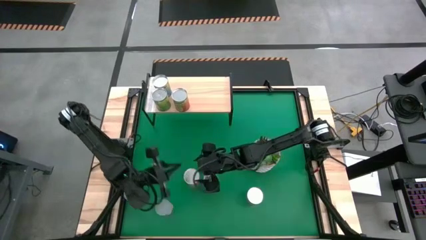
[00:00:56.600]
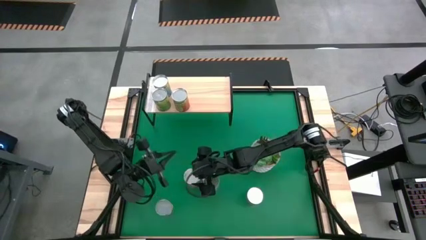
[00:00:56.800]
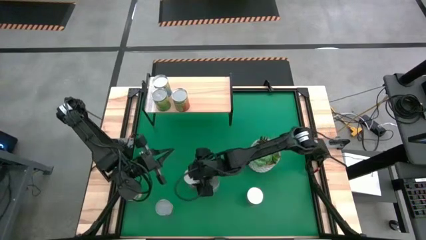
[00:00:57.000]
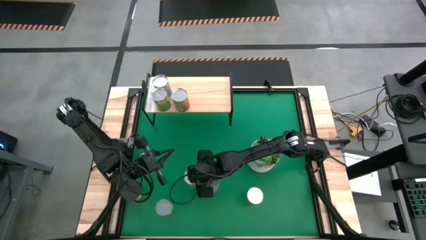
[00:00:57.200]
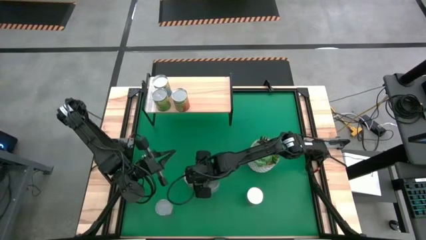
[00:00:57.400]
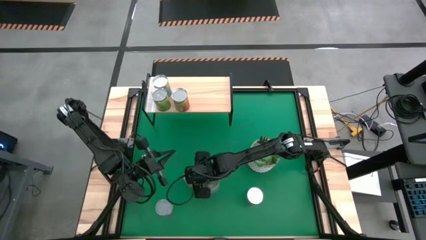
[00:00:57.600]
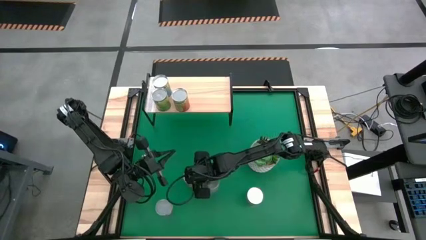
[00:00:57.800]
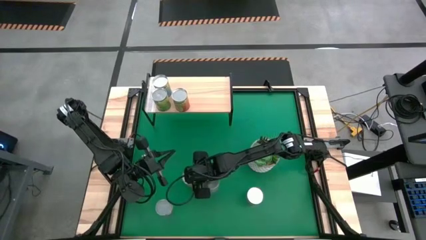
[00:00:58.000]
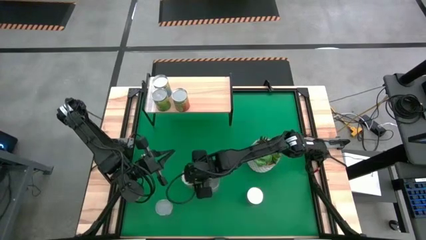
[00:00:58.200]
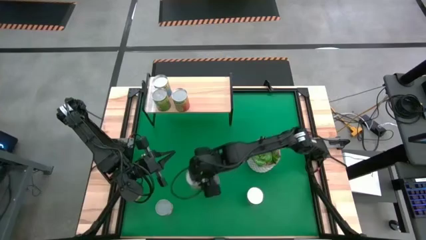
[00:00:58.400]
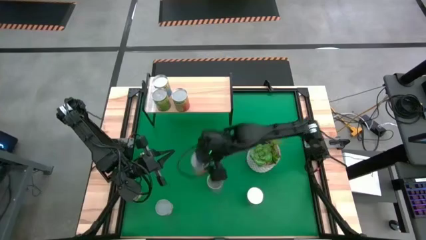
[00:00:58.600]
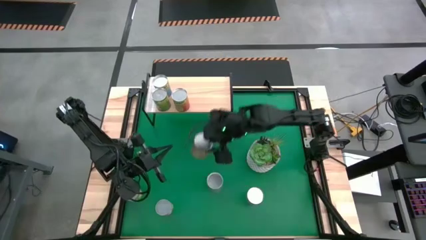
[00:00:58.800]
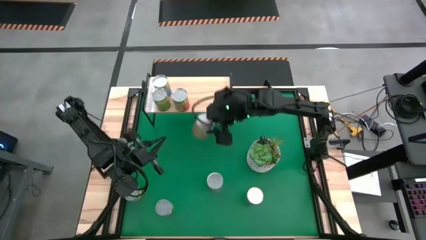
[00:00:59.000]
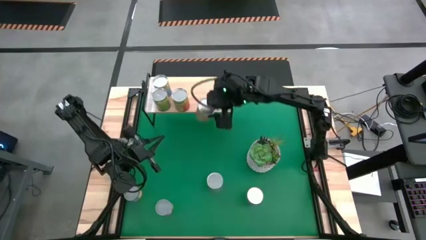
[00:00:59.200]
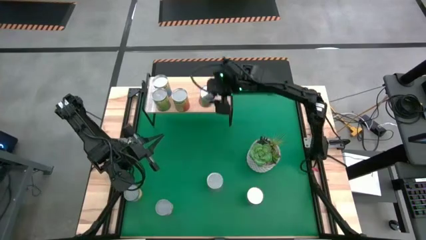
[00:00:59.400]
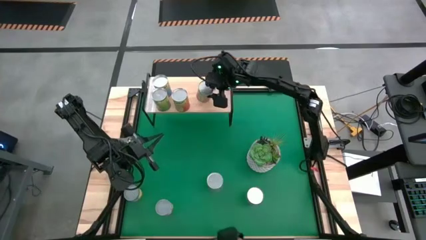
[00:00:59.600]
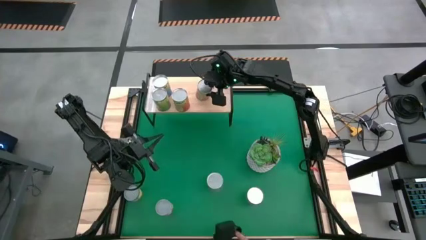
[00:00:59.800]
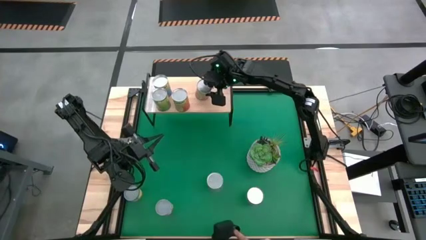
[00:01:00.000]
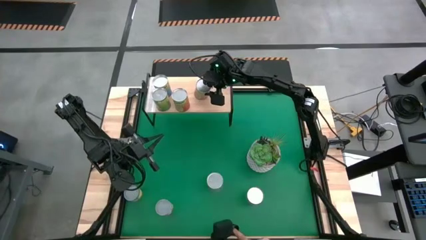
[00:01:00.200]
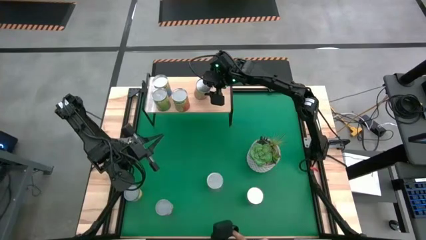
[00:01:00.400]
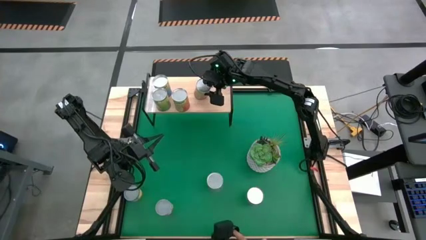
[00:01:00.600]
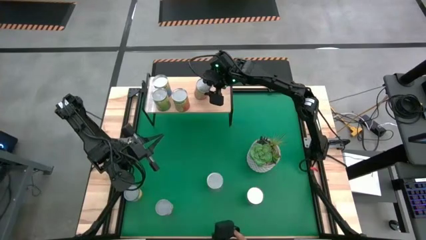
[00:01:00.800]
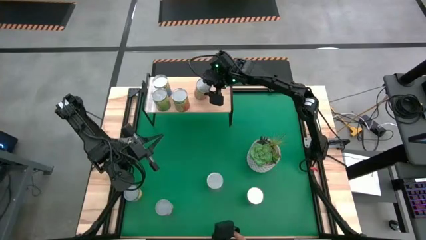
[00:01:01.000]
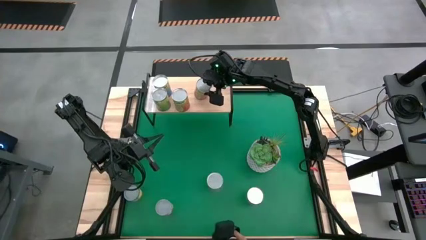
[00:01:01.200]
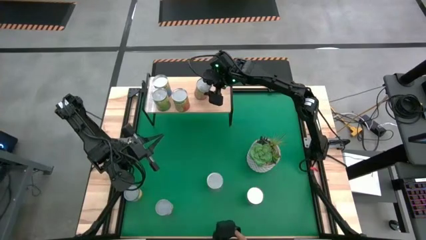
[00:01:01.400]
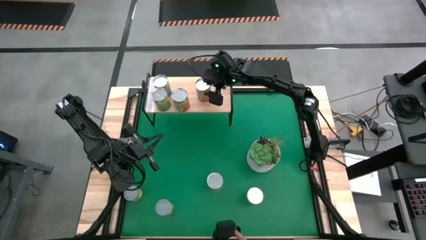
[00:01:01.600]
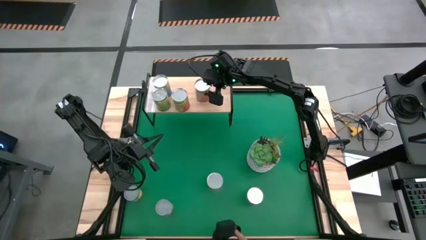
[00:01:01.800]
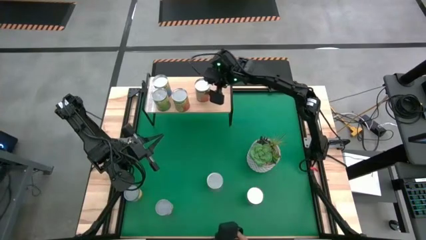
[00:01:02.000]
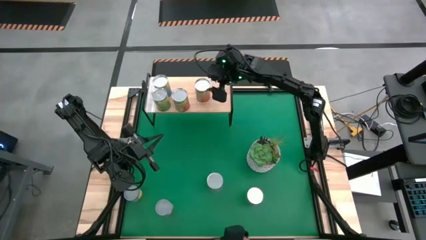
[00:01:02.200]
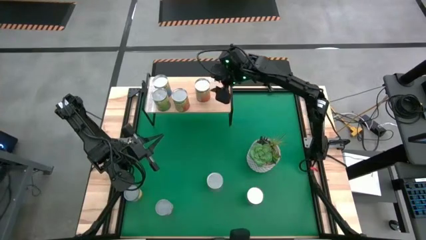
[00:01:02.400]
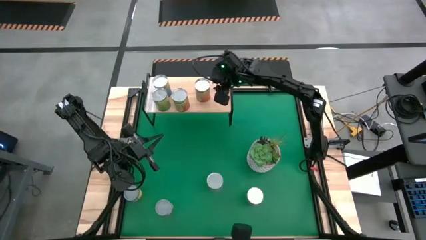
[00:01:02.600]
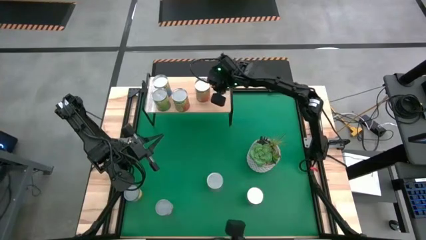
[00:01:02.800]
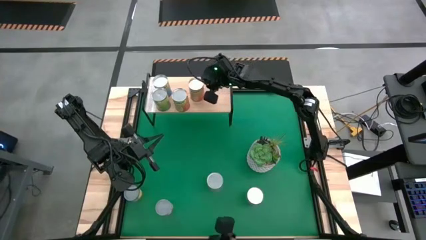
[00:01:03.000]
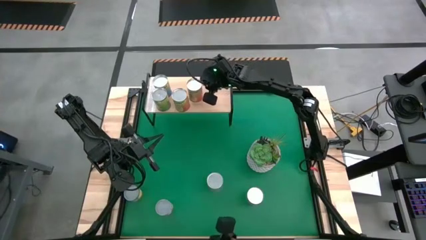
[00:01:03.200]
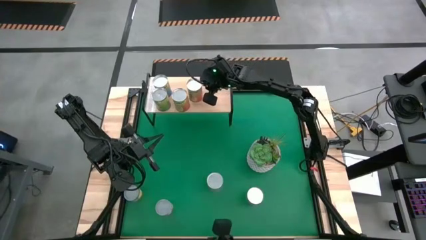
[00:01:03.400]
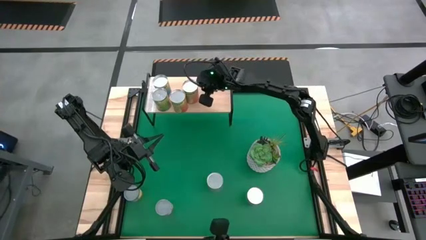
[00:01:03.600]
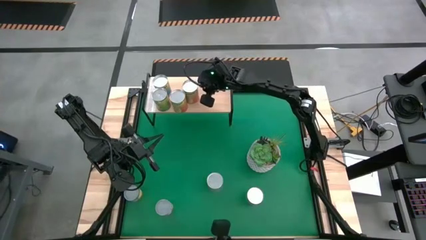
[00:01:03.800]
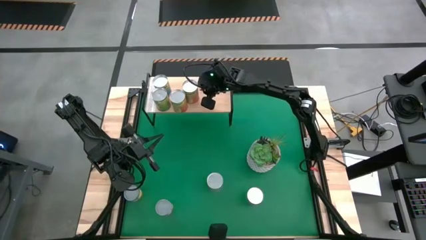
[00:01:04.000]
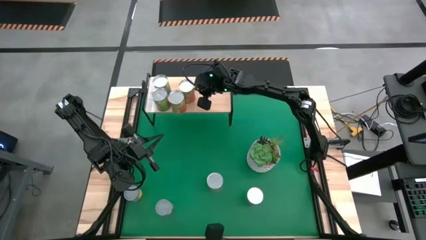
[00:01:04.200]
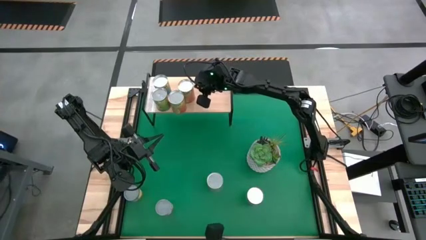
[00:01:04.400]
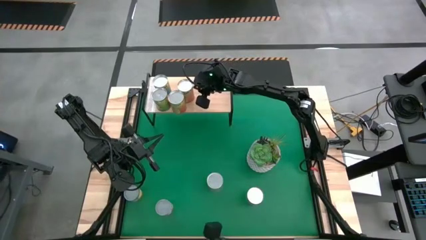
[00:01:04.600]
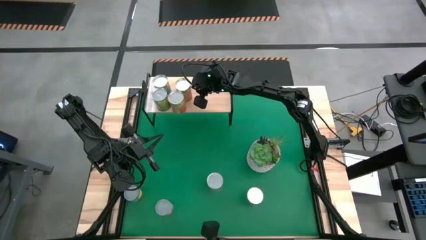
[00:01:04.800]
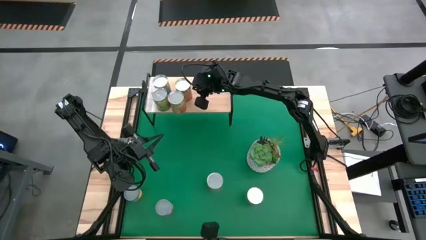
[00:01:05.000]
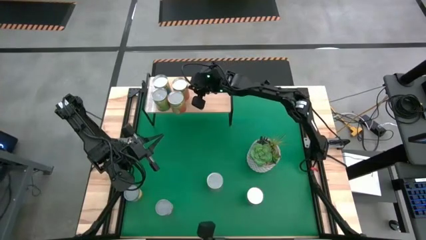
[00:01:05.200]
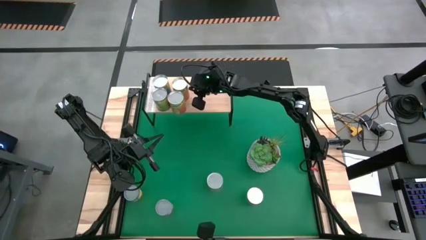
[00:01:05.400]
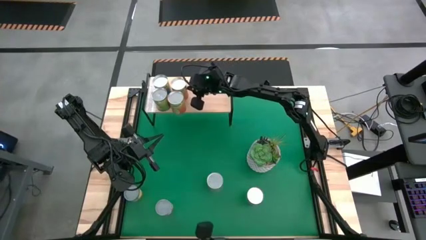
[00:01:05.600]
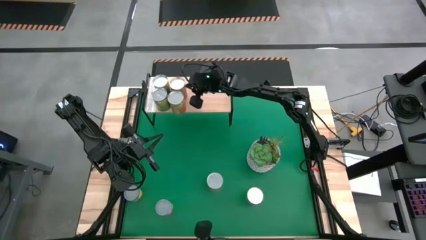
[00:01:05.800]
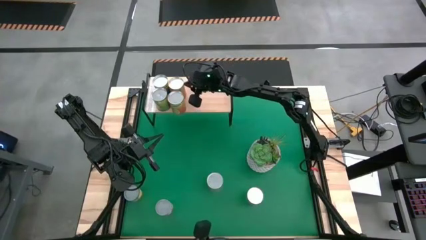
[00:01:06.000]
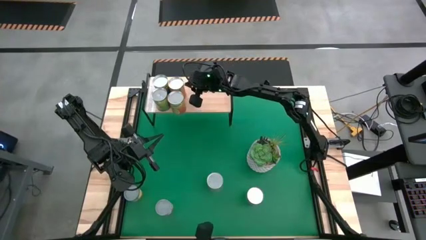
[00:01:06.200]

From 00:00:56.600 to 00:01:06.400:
Task: Pick and place cans onto a shelf
Put the canned pineapple on the shelf

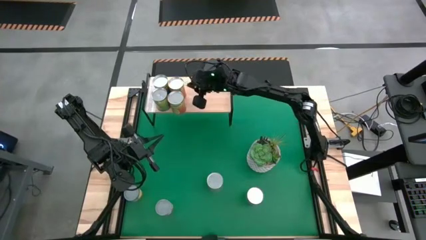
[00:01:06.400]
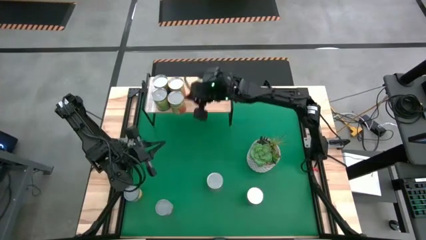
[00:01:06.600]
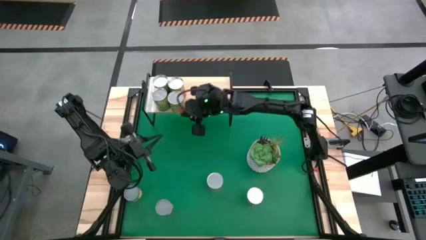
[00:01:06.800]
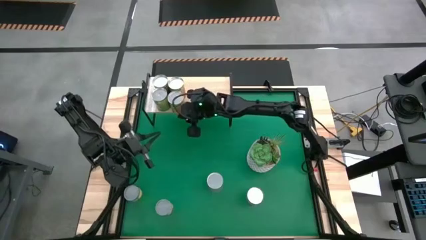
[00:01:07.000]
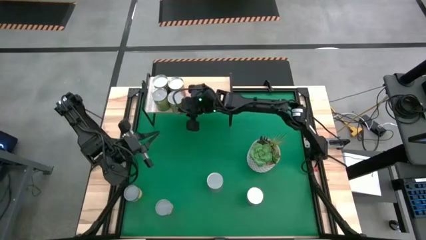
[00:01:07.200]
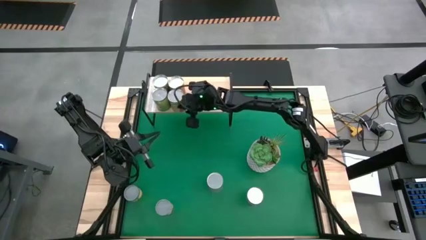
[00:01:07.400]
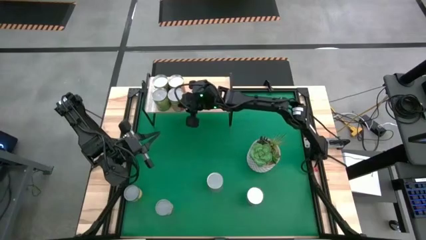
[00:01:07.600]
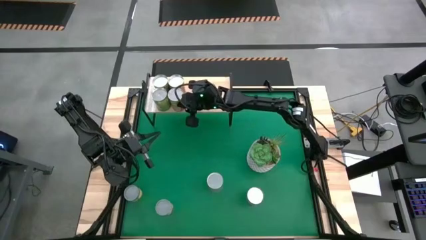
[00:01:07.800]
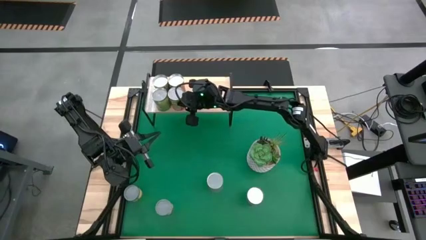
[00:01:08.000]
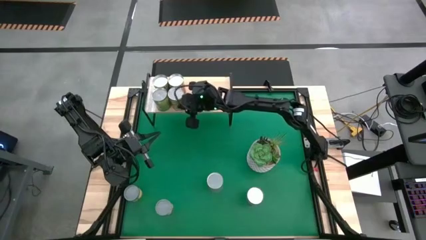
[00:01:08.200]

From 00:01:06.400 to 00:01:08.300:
Adjust the canned pineapple on the shelf

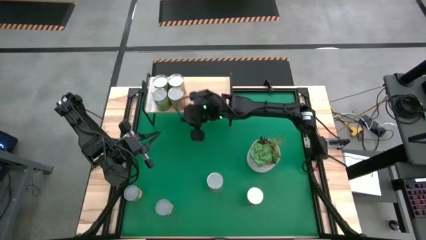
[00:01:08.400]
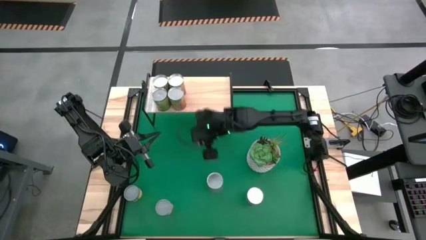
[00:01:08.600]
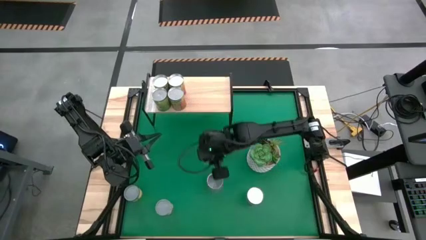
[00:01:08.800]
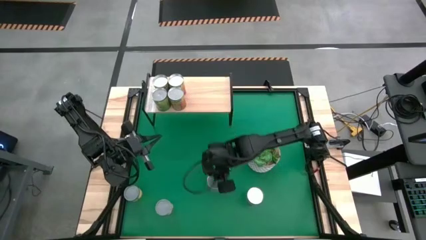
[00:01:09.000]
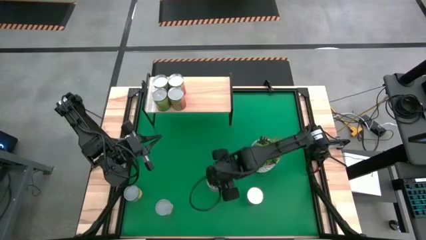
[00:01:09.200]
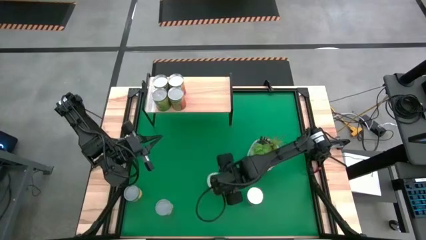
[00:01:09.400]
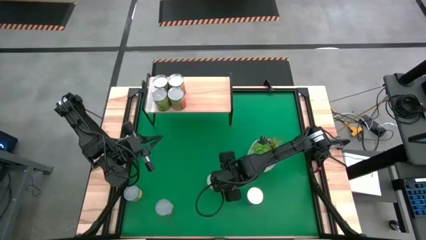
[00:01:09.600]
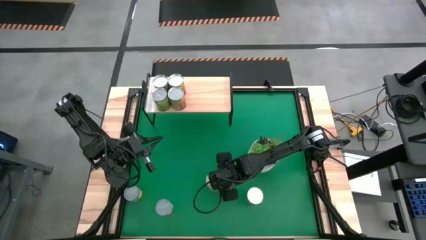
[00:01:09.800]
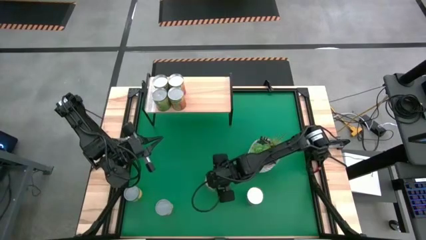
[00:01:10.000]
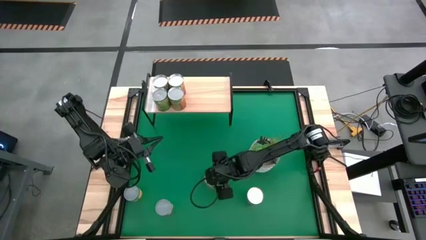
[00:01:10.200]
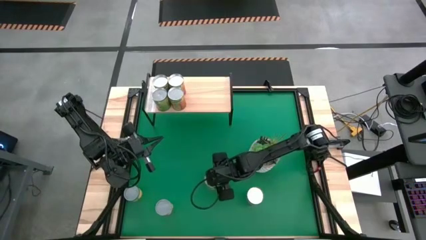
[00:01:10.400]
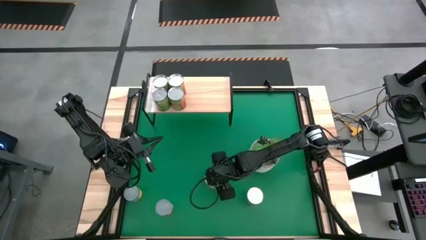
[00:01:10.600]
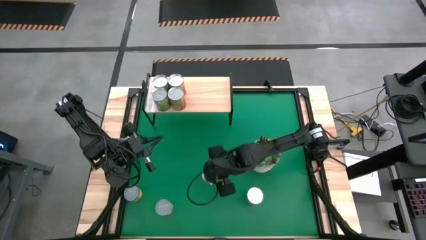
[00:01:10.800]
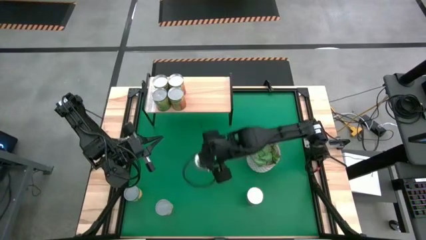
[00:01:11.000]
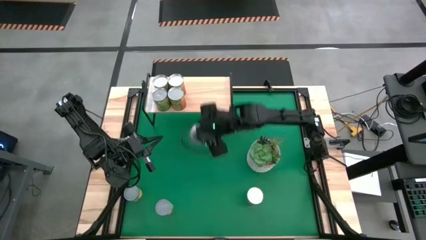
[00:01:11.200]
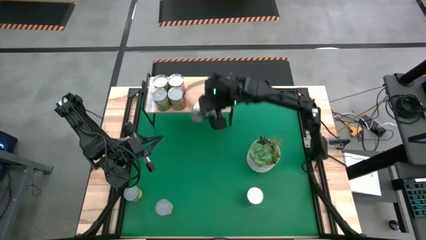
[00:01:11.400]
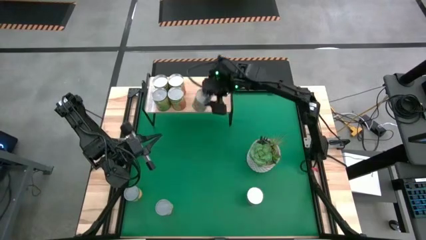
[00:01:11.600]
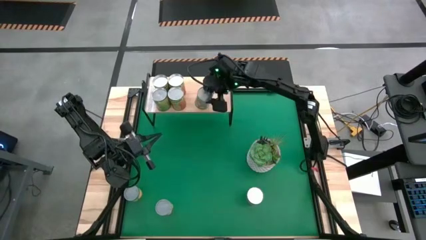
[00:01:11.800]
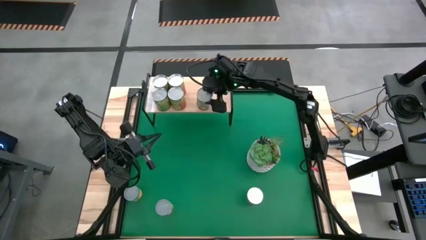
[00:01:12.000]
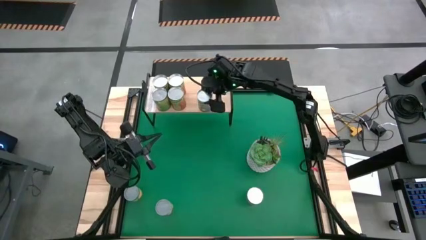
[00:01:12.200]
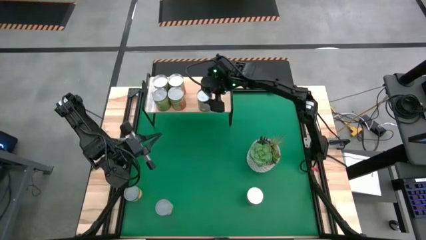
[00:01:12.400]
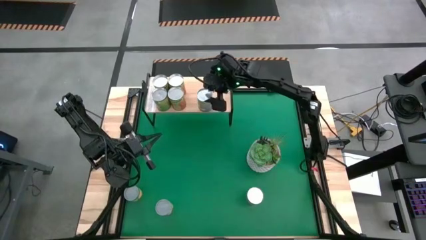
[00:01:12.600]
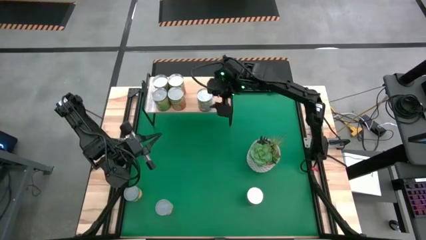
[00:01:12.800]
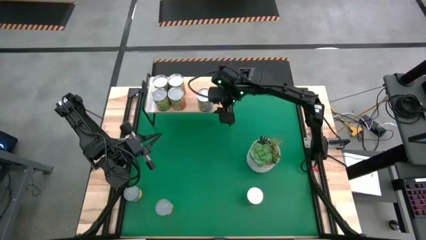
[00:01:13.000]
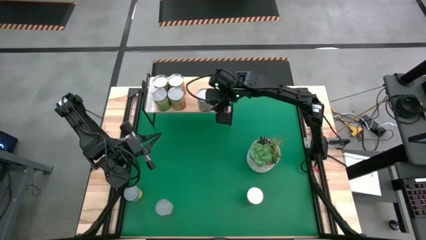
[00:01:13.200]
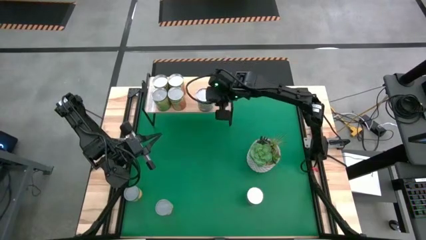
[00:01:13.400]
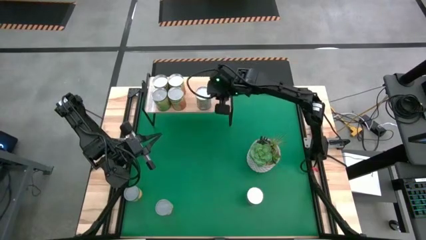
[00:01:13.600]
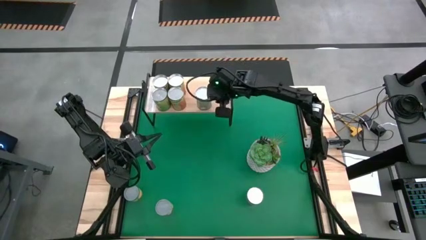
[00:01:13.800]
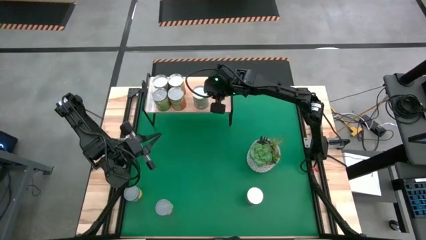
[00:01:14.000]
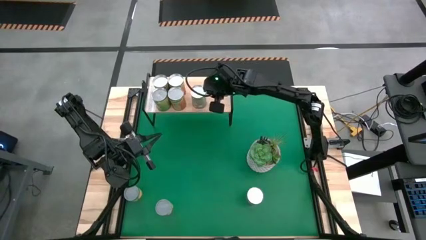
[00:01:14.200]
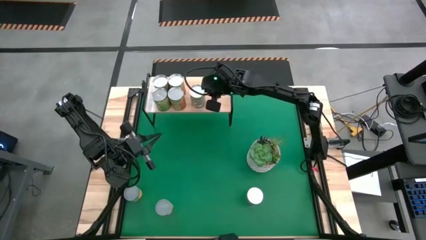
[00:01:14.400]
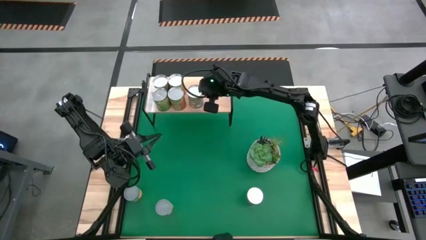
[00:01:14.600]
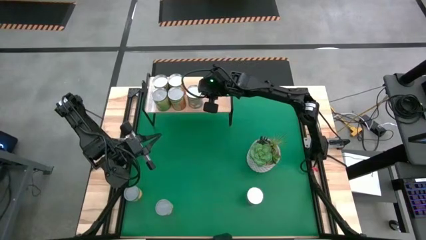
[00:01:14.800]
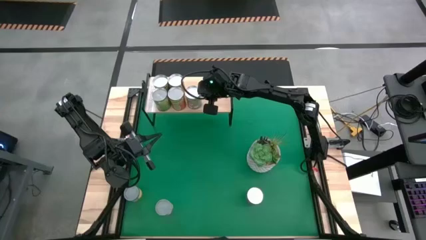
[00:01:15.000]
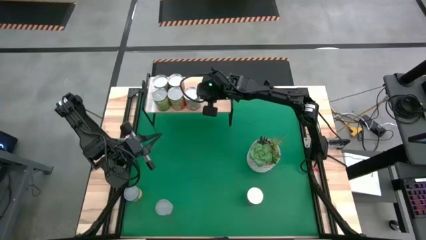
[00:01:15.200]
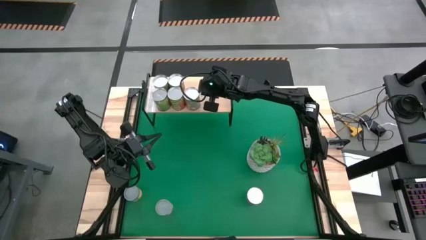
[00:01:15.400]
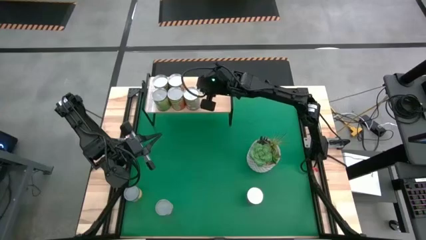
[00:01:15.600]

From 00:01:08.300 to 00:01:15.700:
Put the canned peaches on the shelf
